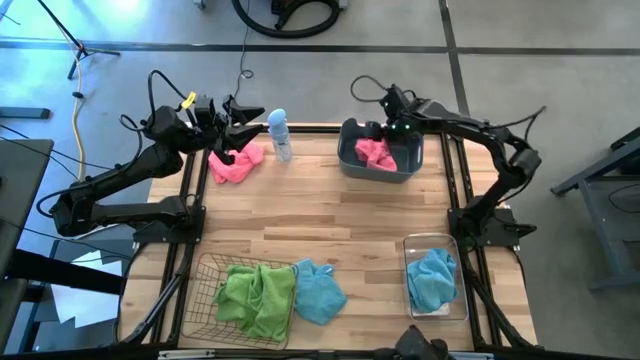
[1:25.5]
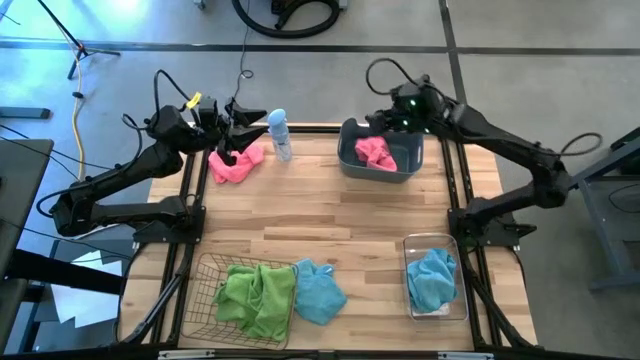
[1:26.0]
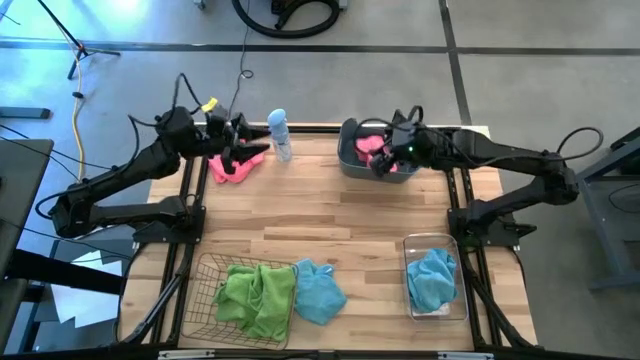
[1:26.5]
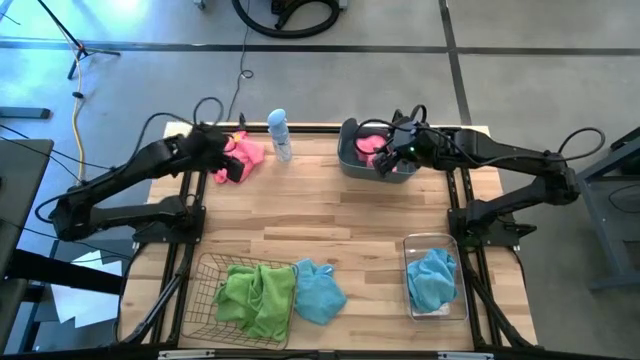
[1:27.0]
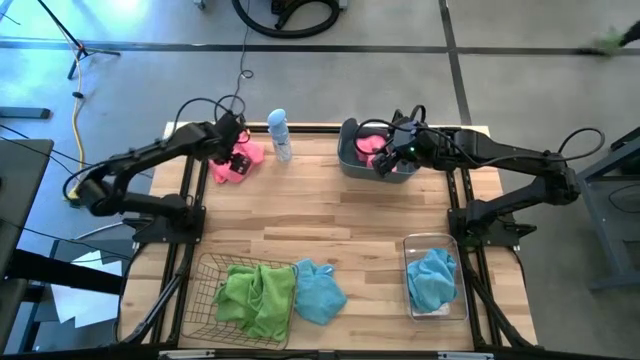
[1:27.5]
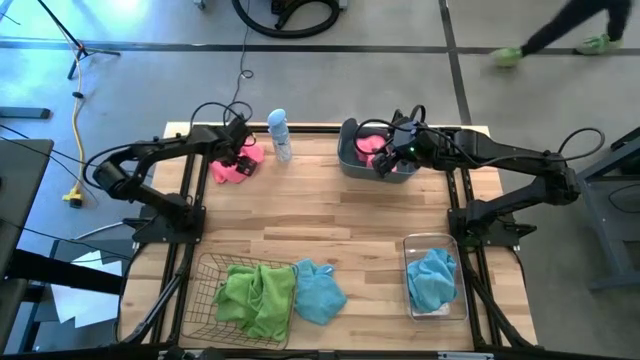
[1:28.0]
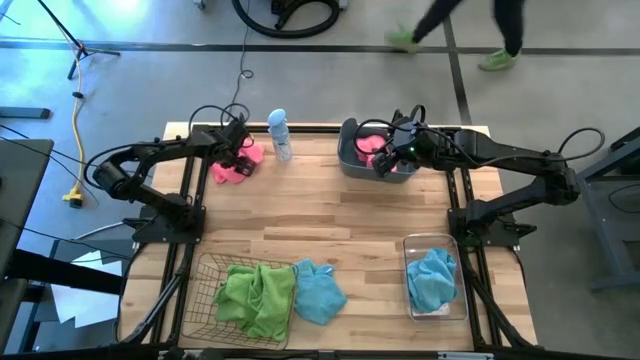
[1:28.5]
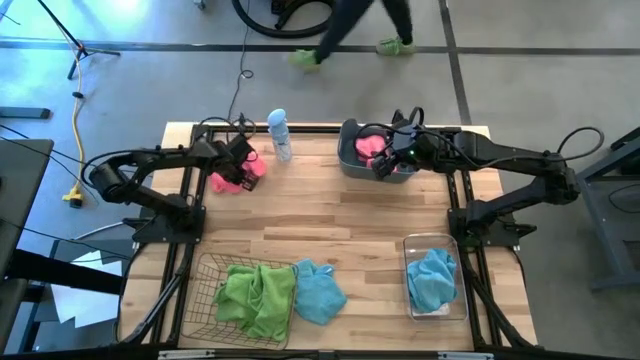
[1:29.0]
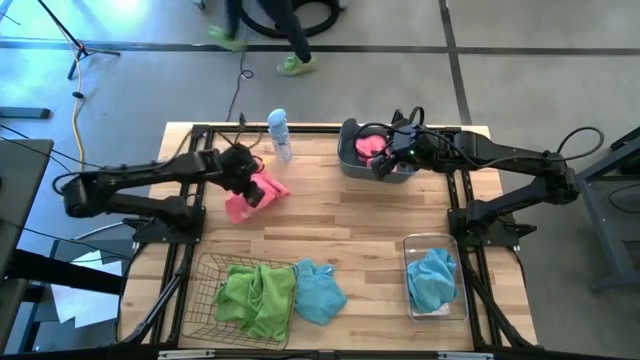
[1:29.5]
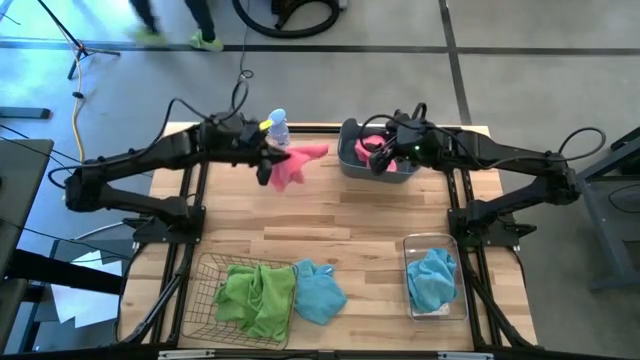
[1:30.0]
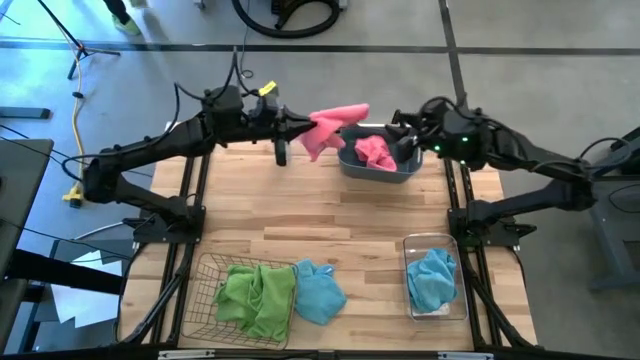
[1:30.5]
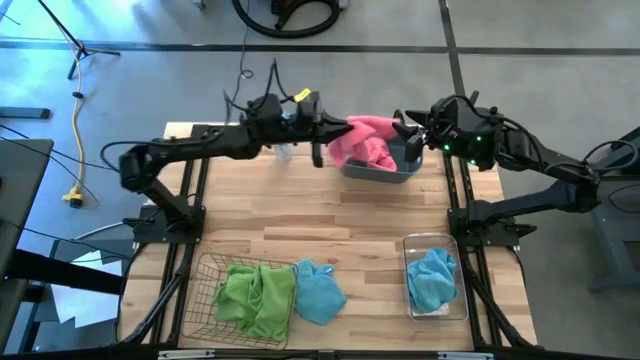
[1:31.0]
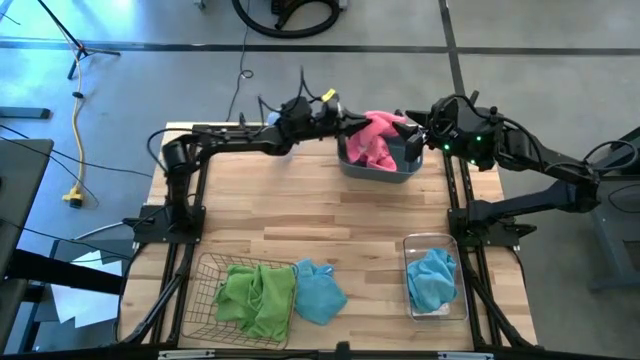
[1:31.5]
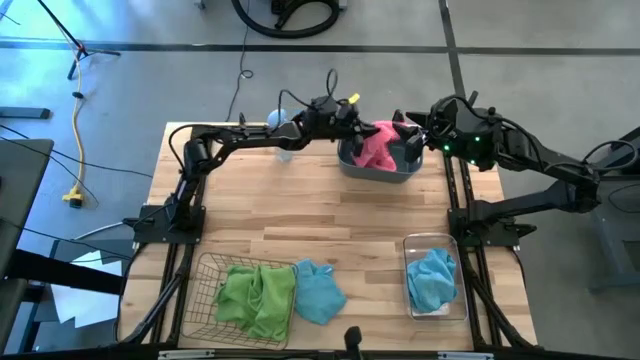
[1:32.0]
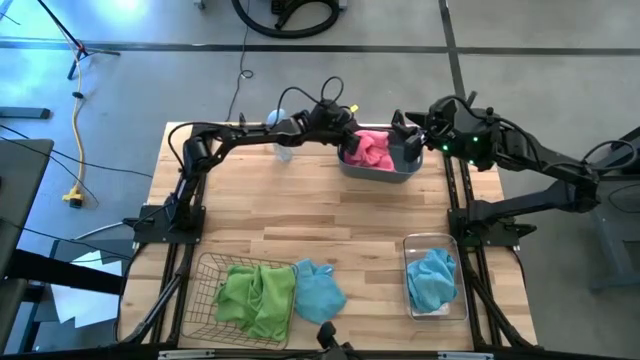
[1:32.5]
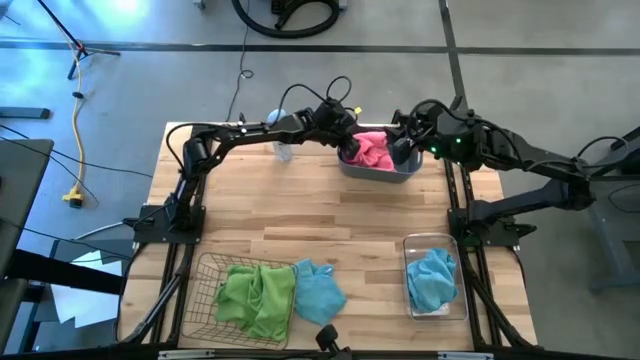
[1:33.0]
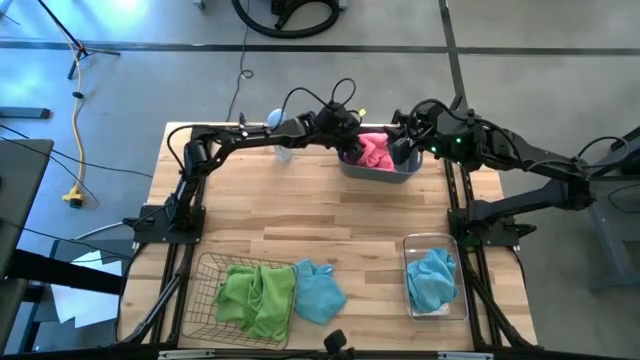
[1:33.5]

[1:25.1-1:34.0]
Task: Sort microfiber towel by color & place in baskets
Put the pink towel into the dark blue bin

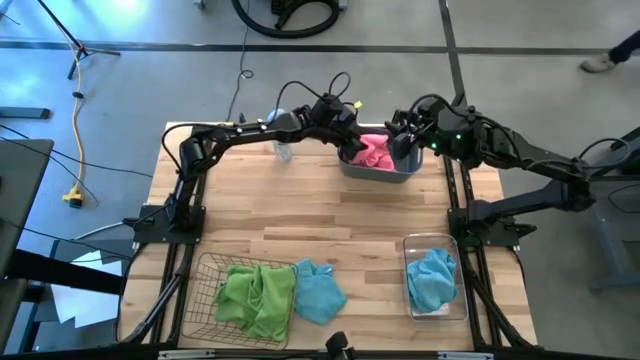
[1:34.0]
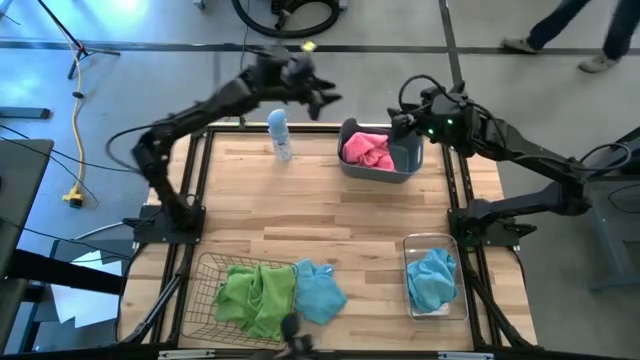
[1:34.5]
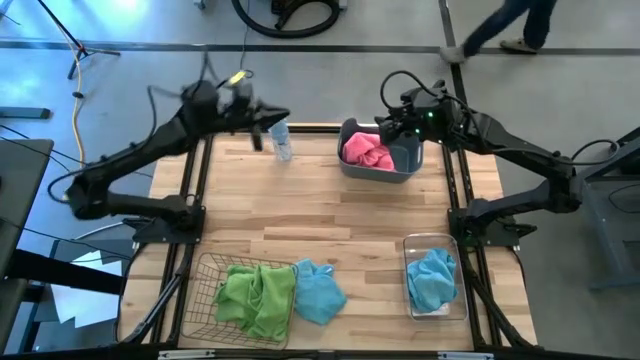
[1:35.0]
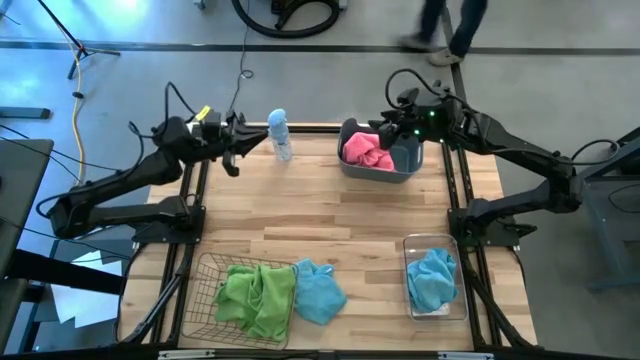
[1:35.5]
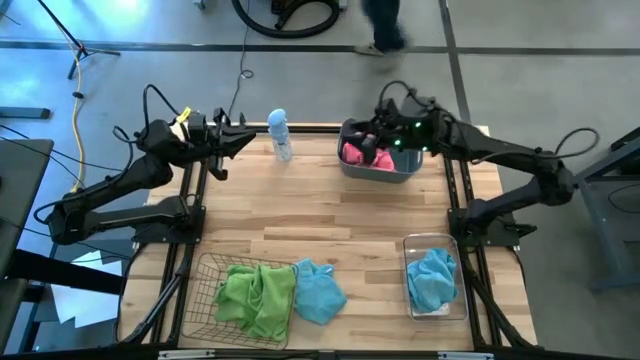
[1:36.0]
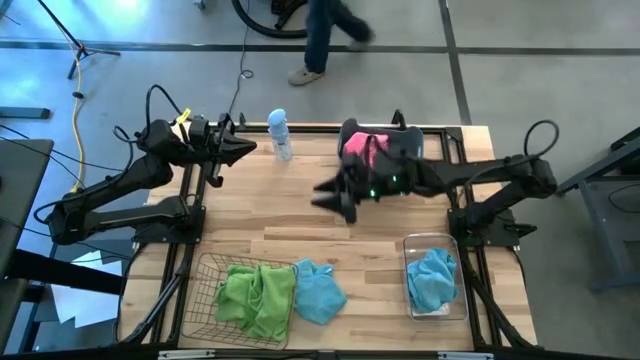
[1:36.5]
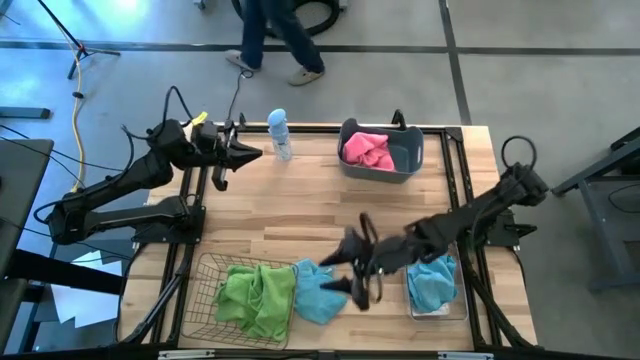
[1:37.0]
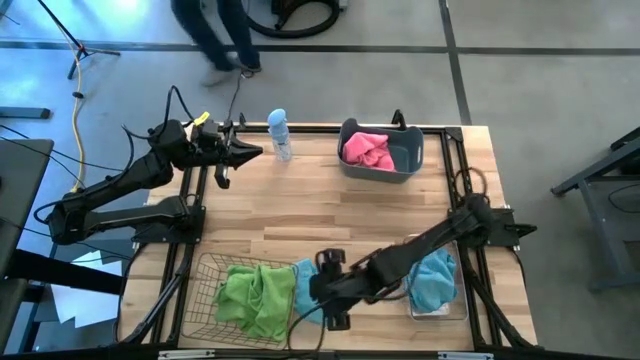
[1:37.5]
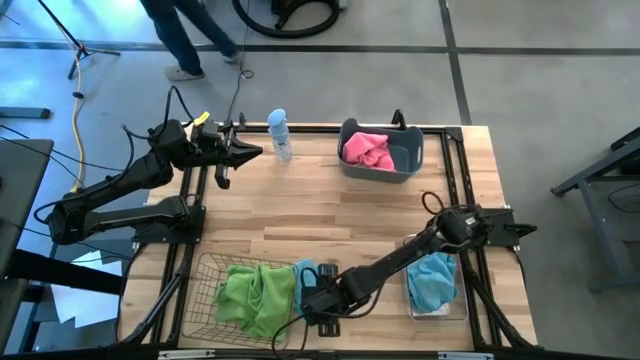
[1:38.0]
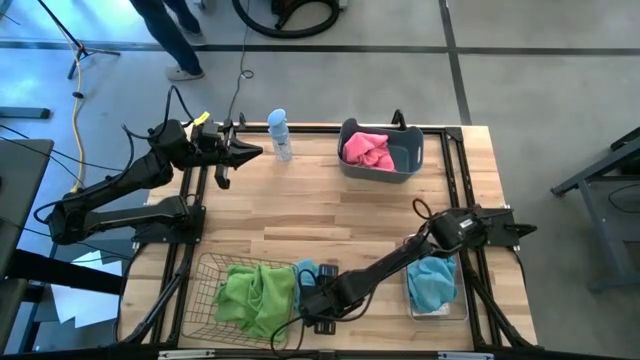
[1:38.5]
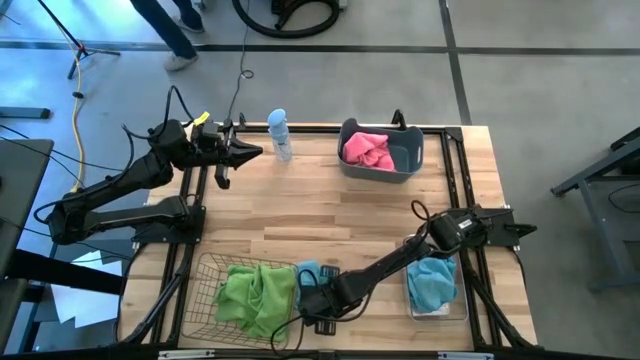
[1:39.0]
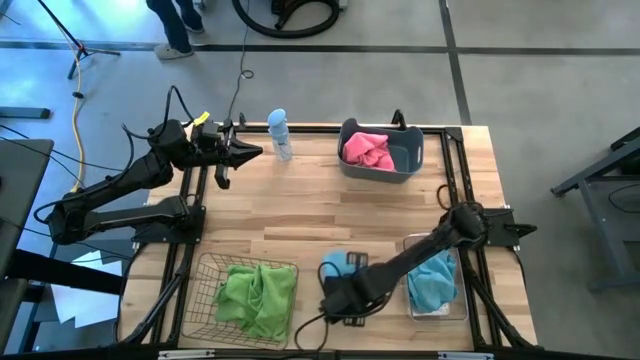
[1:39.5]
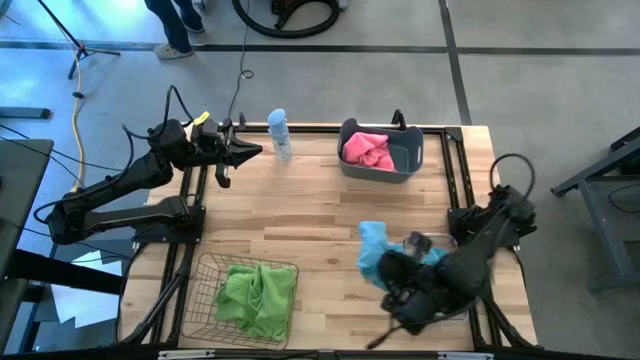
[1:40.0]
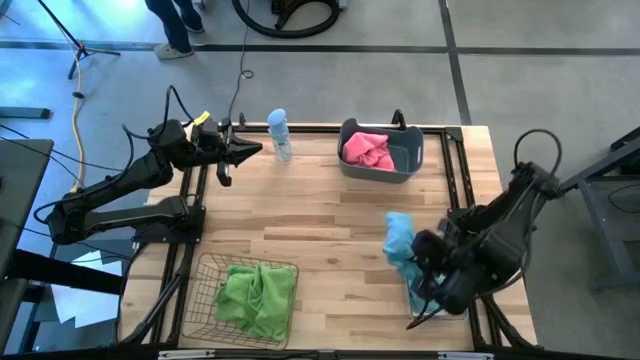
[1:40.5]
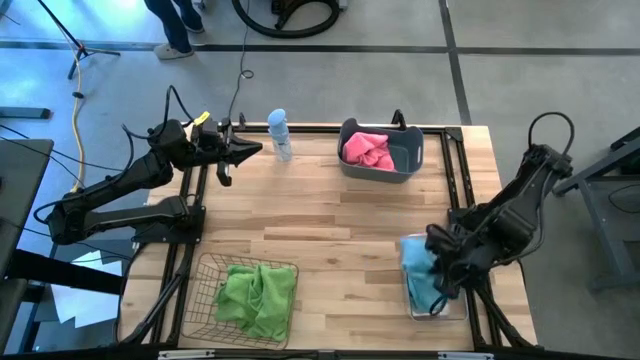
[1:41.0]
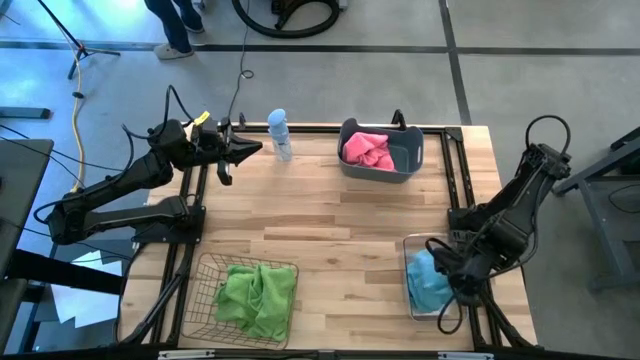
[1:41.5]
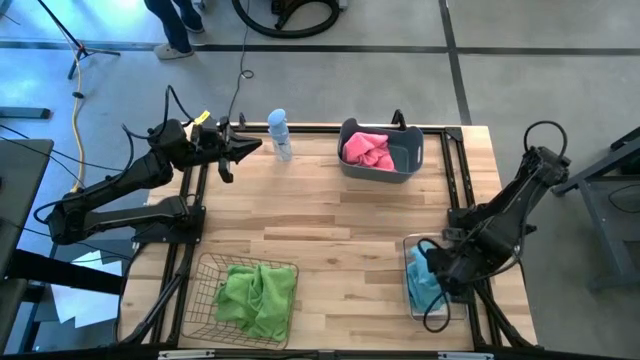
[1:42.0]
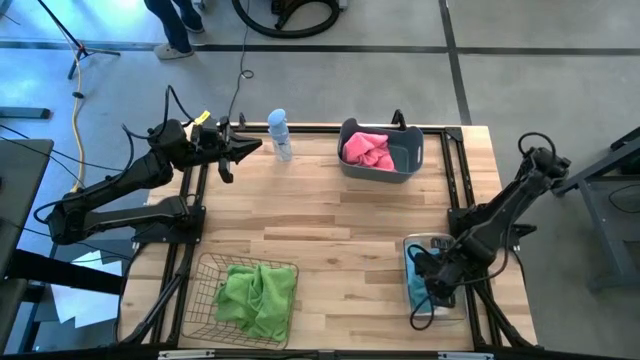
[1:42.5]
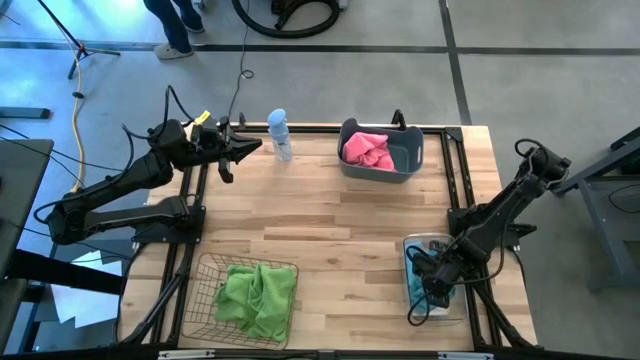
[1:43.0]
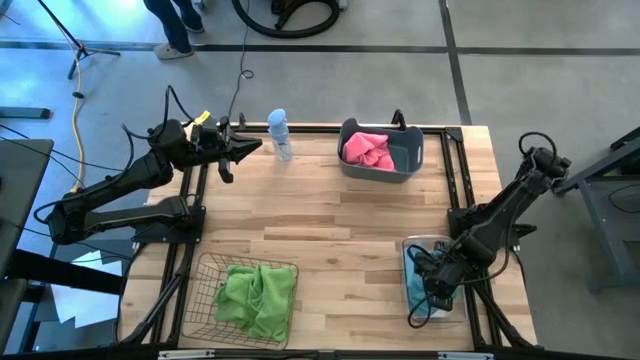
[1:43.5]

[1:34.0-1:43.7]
Put the blue towel into the transparent bin

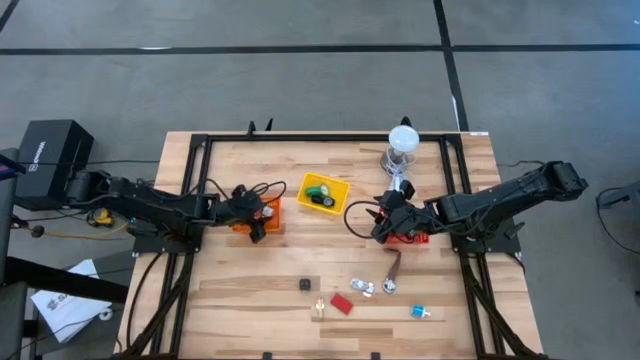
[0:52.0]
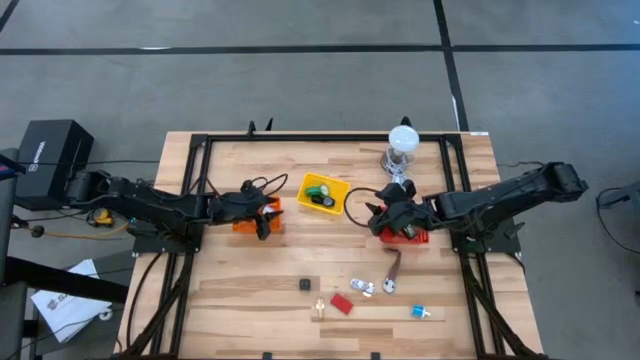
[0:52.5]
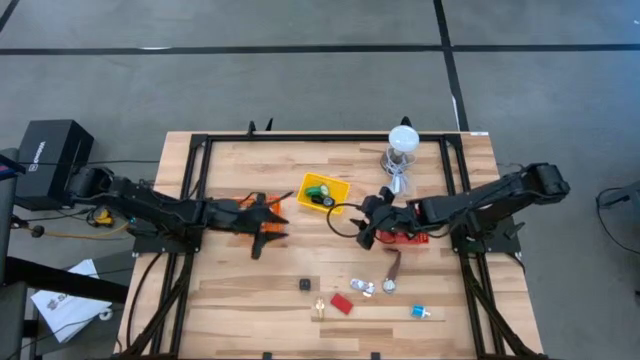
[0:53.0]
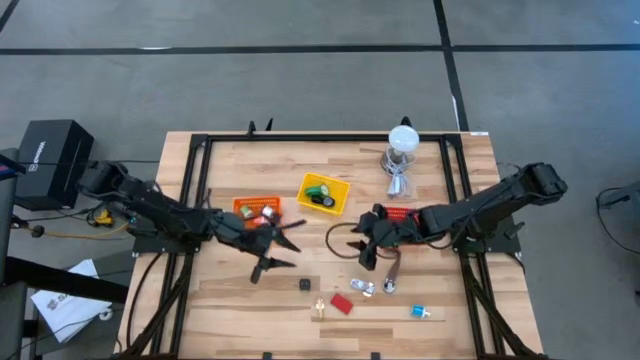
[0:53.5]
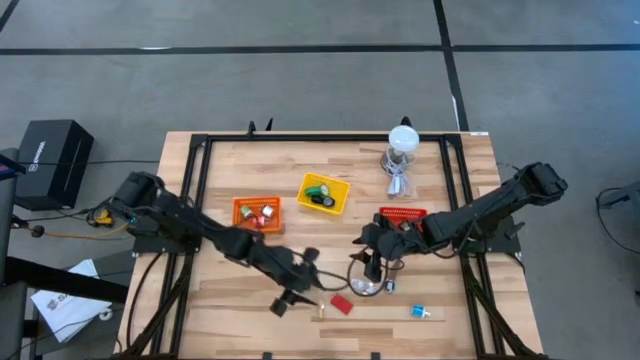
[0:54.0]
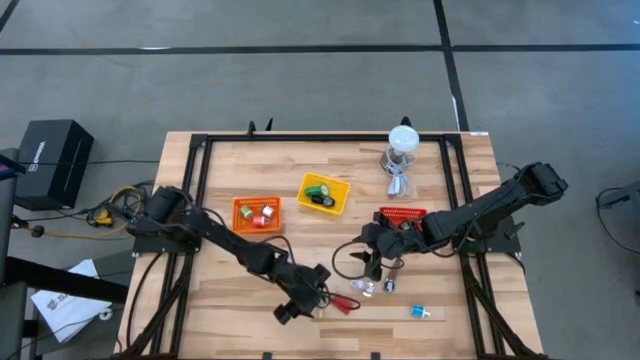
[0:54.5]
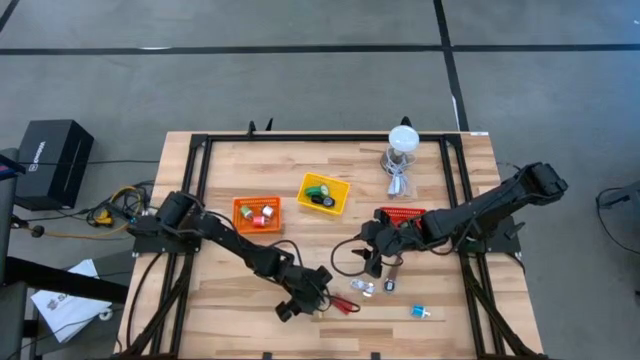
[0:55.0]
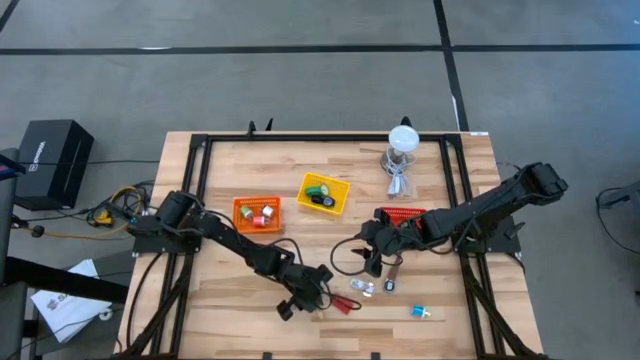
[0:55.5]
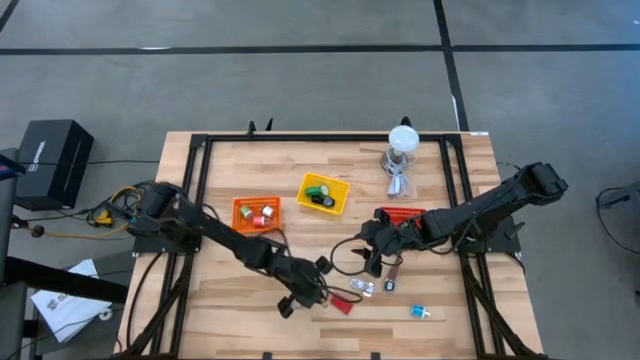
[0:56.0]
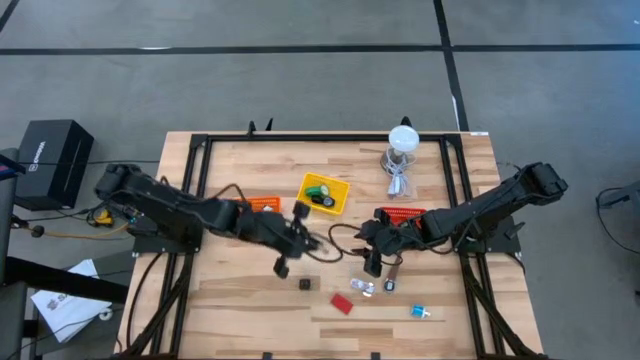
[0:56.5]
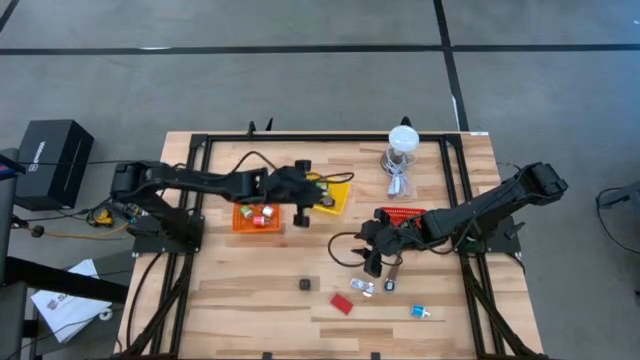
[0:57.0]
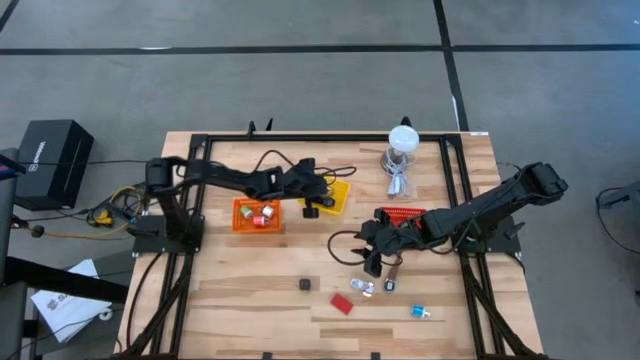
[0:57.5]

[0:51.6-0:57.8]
Task: Pick & Place Office items
Put the gold wristwatch into the yellow bin
